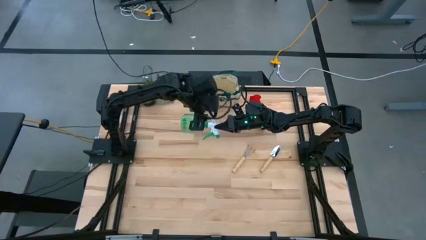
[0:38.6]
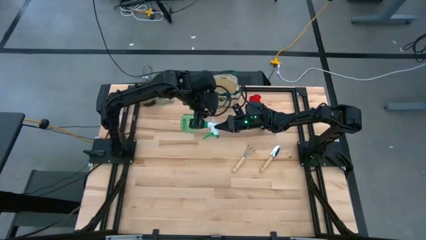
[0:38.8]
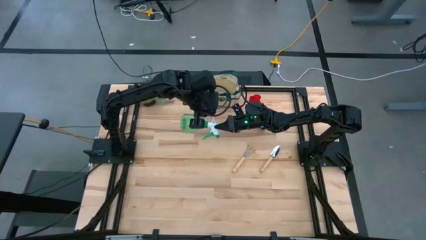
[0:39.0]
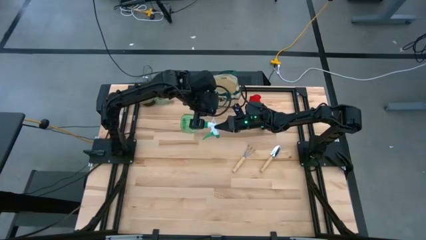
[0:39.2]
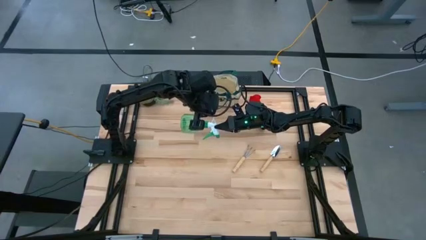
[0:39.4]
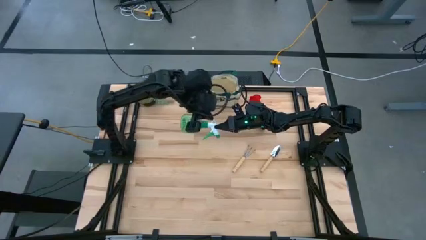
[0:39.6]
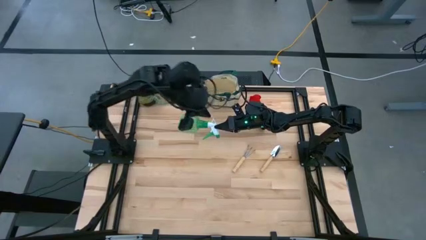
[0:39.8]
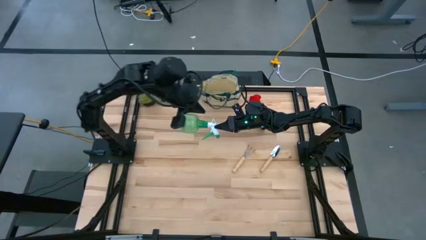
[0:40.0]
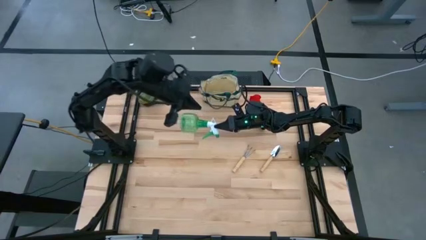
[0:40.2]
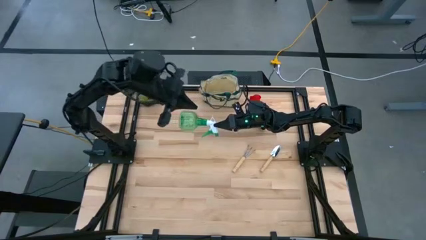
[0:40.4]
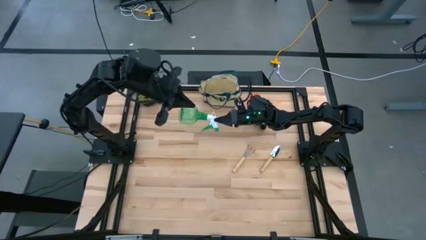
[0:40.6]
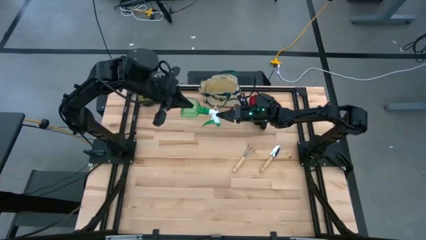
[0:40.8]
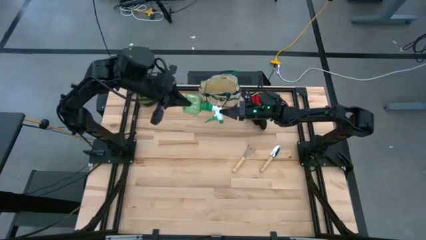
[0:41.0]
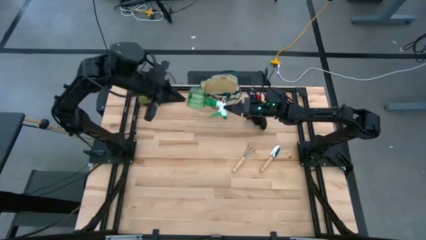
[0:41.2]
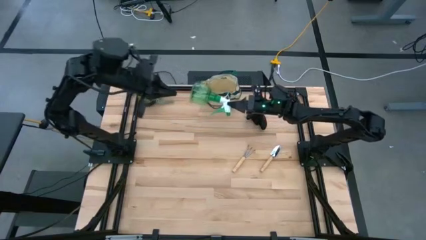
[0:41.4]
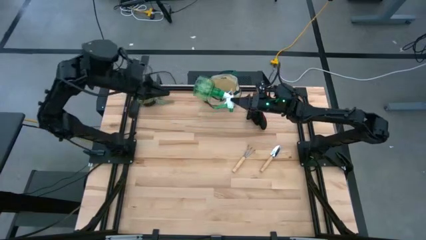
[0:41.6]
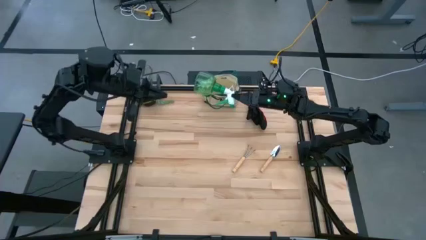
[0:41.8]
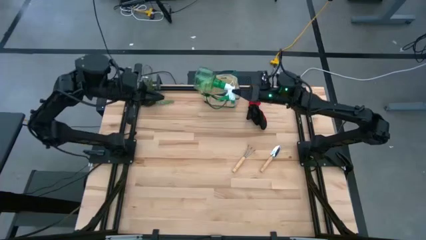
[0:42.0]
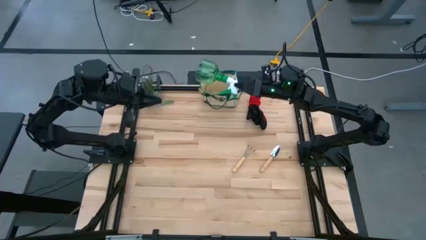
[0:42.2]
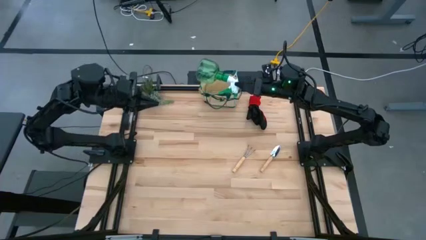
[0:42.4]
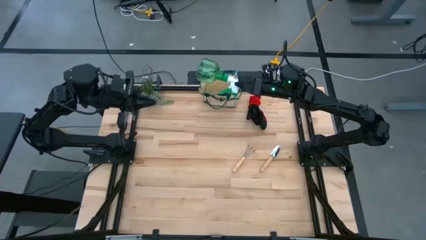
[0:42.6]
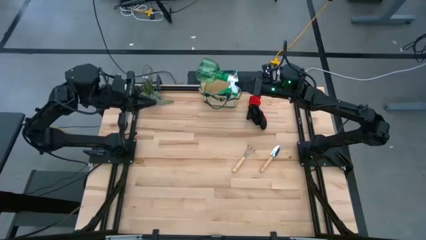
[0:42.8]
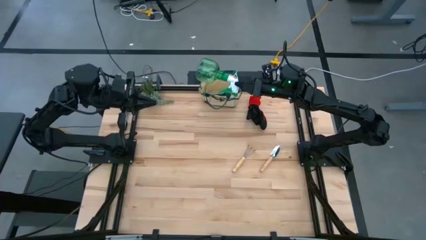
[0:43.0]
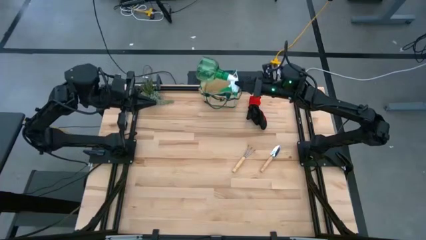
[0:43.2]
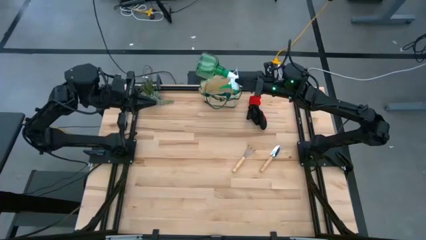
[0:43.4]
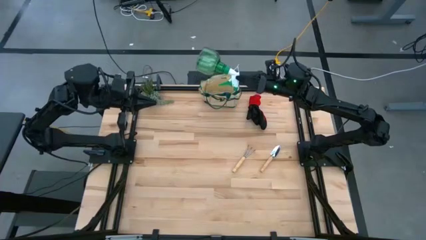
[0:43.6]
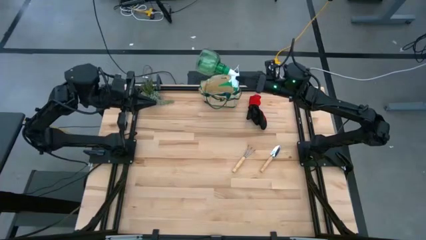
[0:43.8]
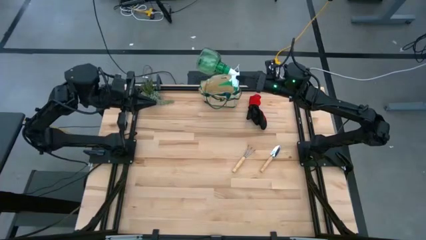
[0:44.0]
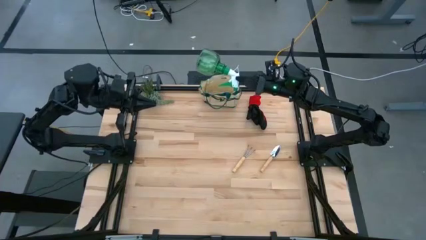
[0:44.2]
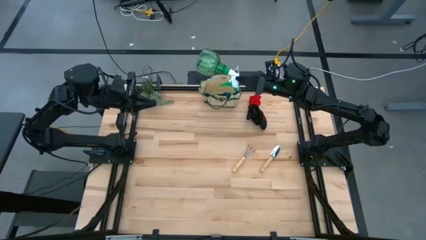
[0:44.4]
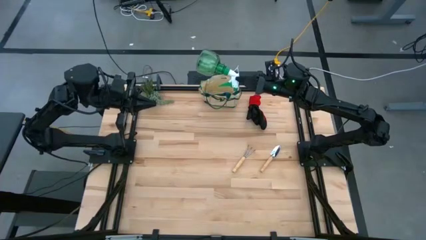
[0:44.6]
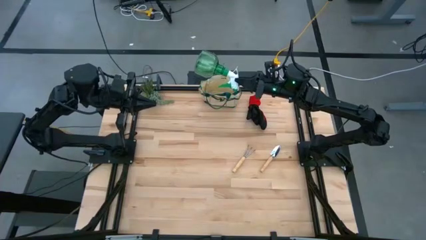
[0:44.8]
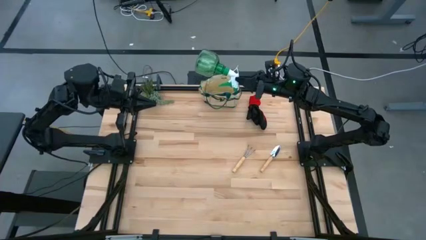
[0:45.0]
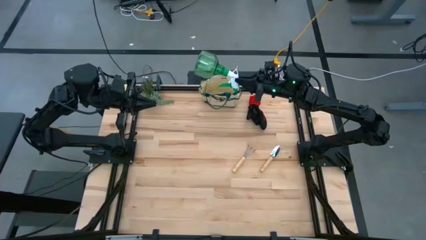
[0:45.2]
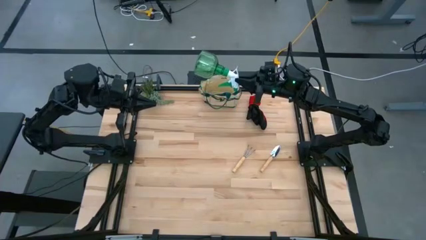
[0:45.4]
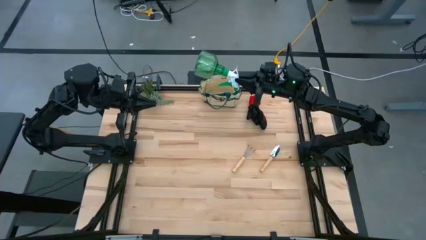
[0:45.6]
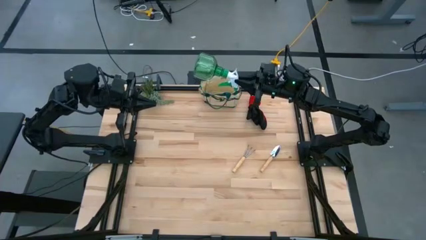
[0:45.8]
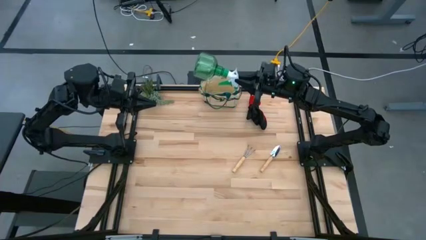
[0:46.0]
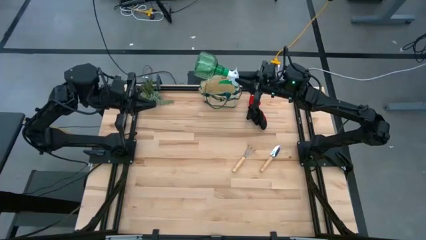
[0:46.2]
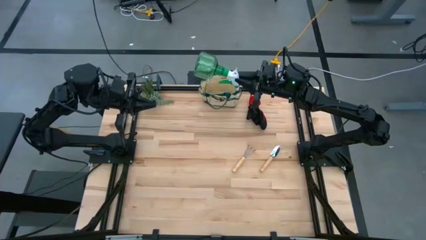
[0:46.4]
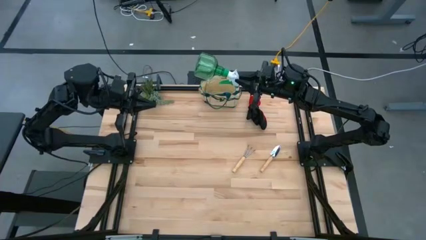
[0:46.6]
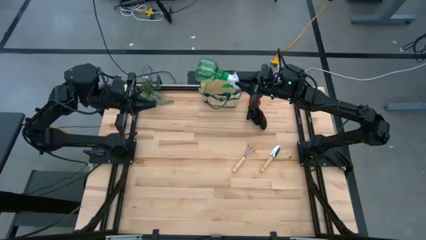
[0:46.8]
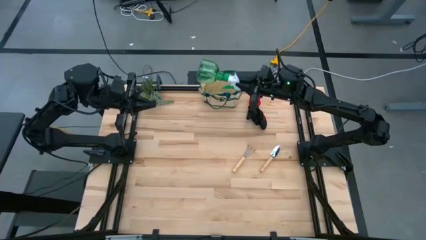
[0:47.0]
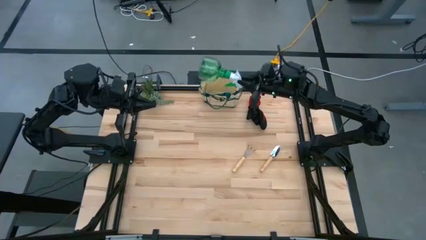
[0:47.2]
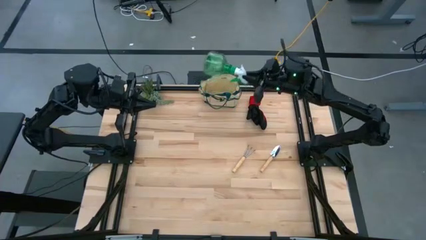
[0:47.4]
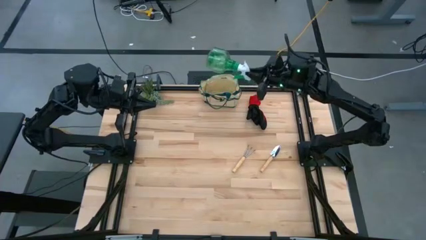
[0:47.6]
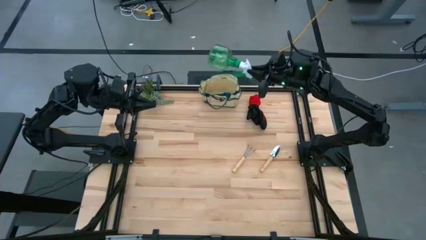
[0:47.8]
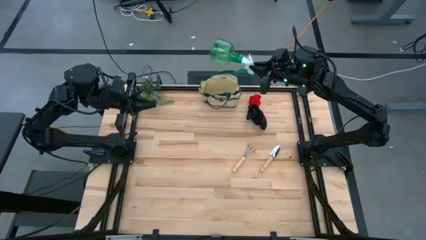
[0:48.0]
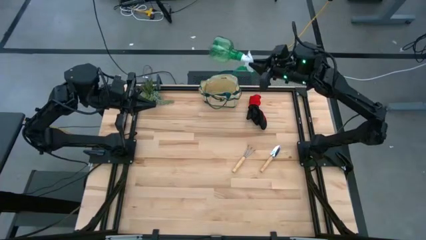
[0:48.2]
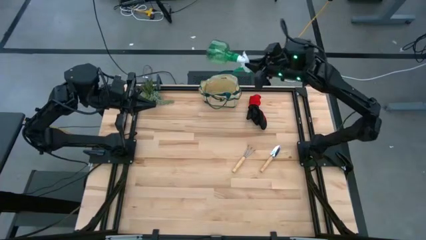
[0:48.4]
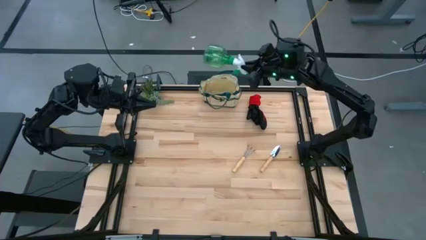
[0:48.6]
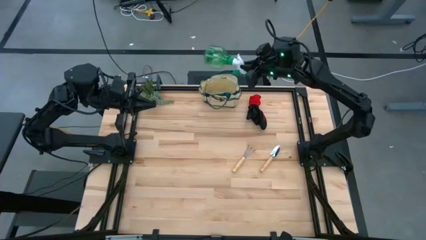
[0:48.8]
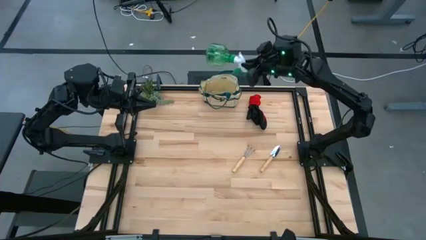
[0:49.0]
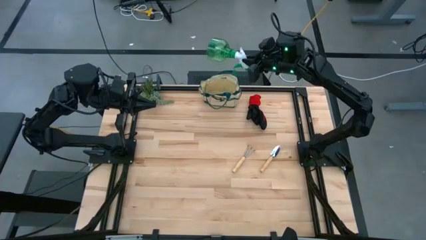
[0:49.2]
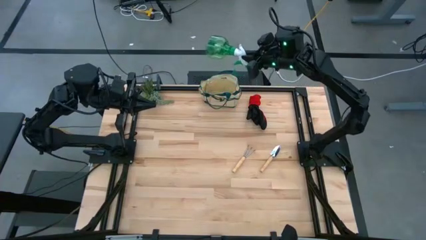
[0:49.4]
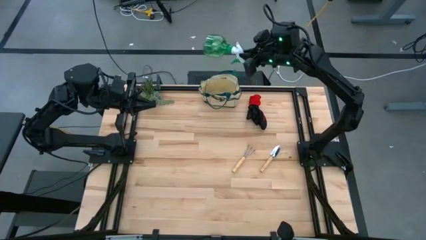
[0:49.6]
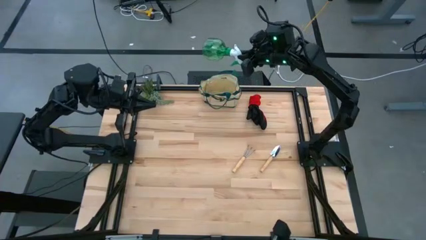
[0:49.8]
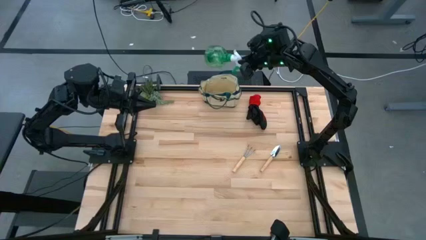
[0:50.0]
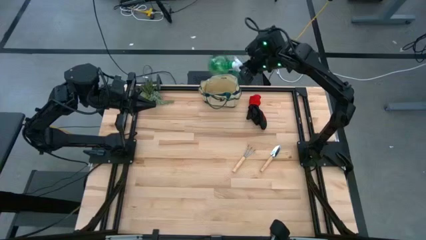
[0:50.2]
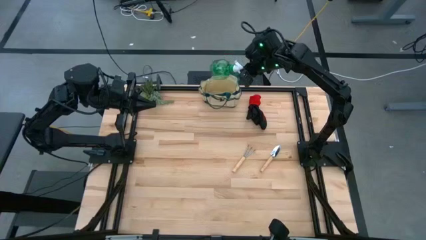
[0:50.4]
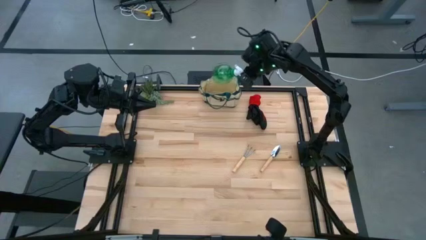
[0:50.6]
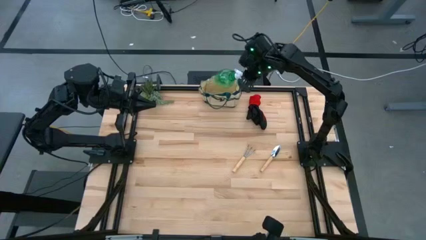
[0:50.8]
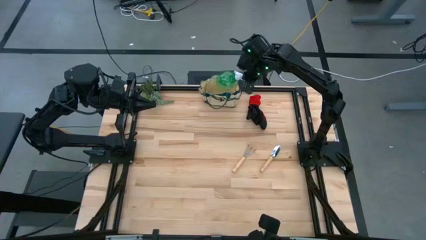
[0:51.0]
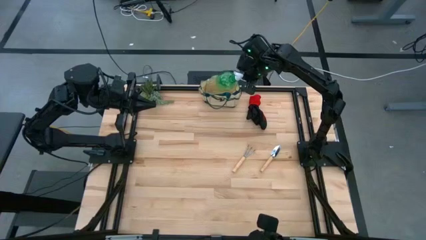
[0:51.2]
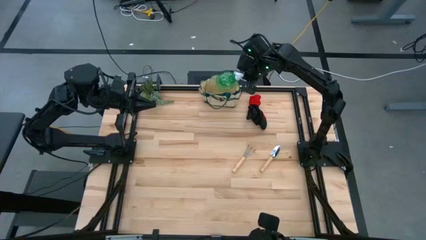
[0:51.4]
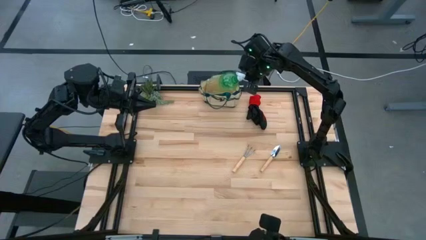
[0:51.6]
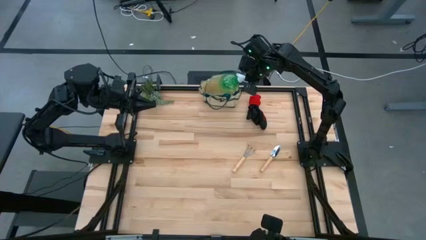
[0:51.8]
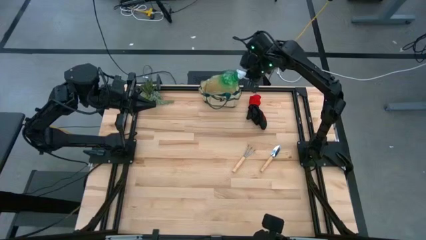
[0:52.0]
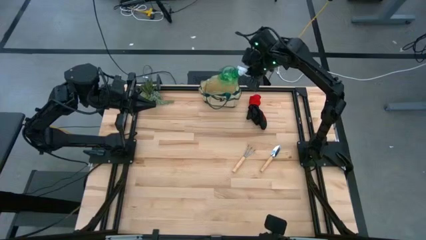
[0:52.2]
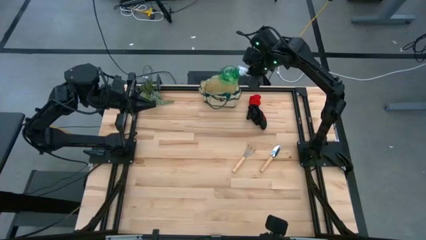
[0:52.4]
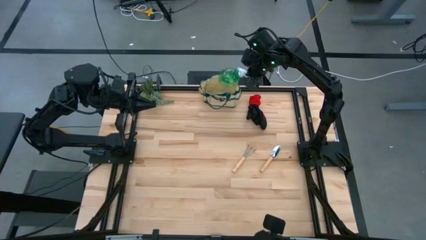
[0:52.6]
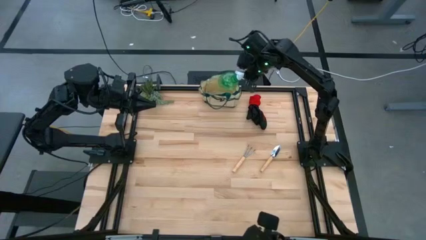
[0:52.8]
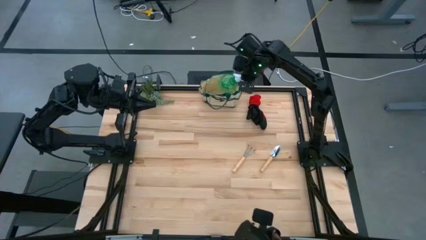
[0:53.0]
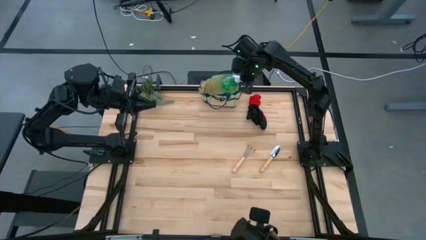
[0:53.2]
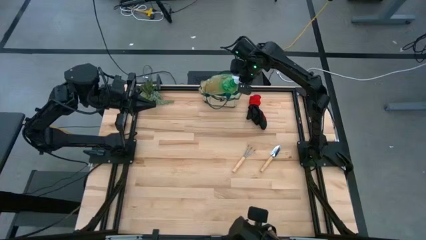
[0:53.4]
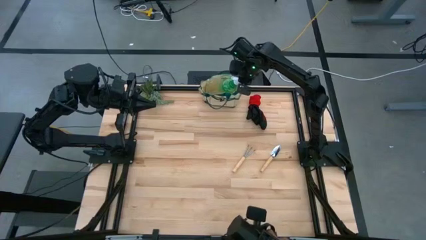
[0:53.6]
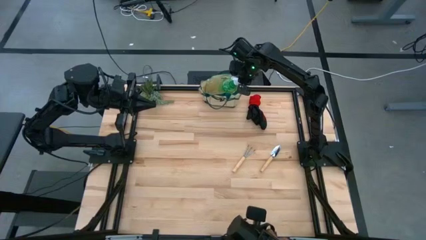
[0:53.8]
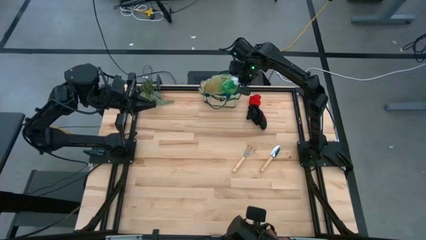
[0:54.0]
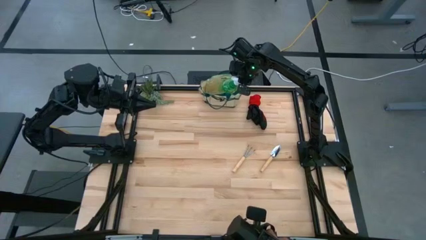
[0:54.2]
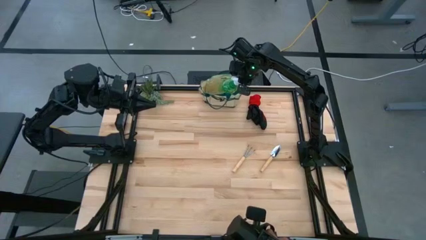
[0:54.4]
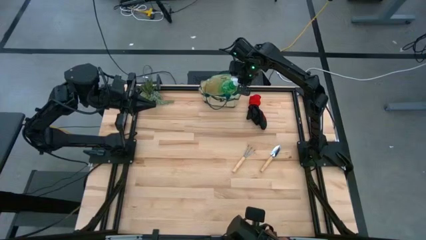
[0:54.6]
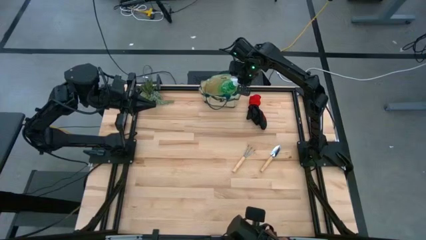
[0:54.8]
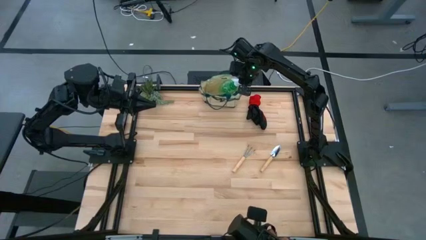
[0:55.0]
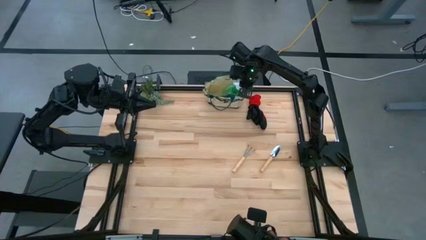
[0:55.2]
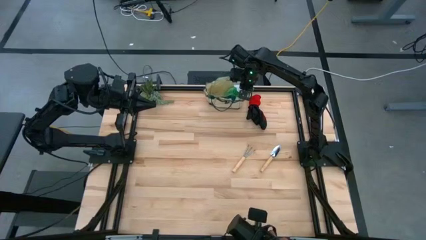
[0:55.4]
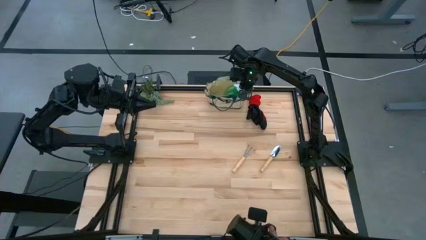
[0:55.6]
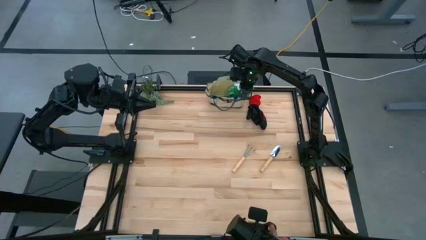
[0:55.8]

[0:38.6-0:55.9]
Task: Pick & Place Garden tools in Gardening bag
Put the green spray bottle into the white gardening bag
